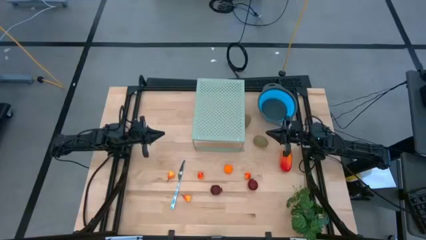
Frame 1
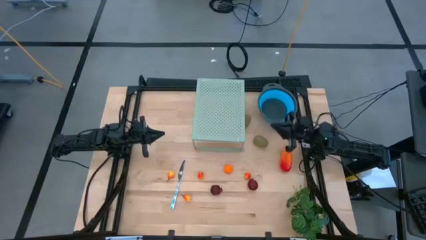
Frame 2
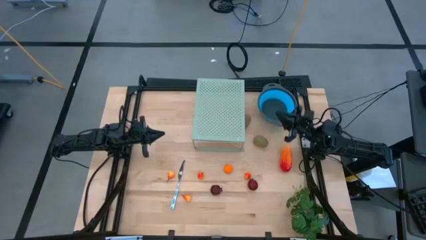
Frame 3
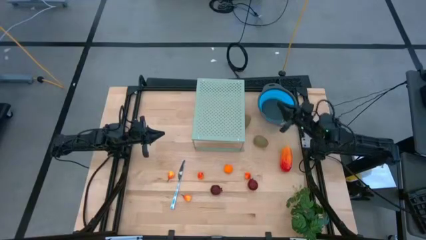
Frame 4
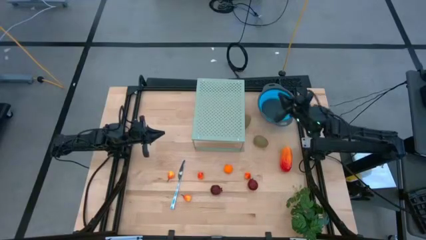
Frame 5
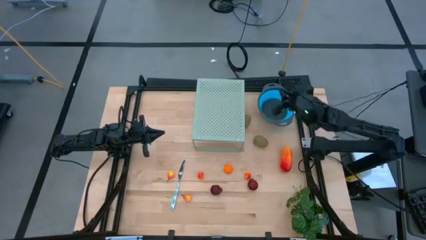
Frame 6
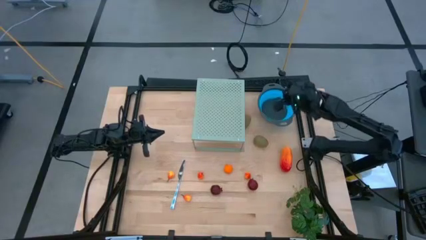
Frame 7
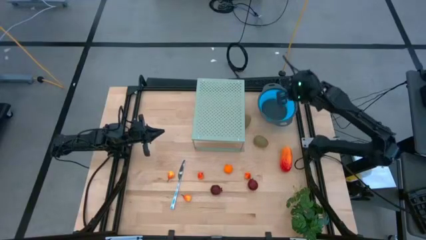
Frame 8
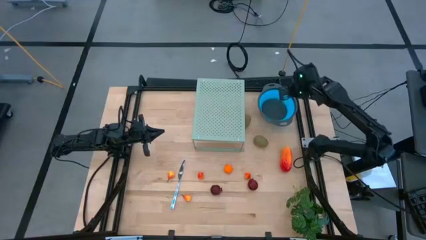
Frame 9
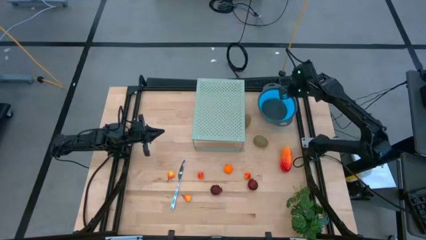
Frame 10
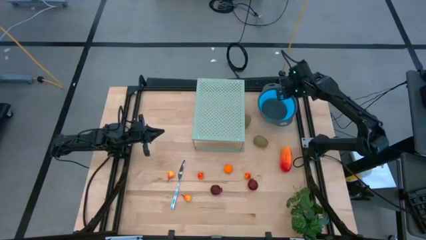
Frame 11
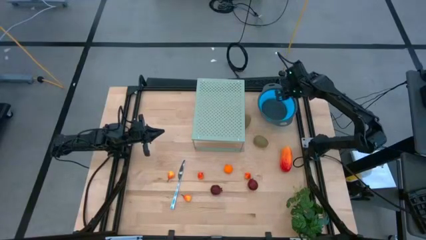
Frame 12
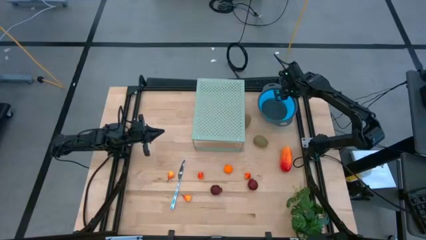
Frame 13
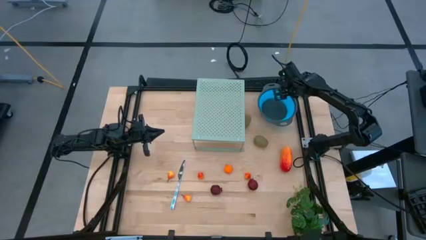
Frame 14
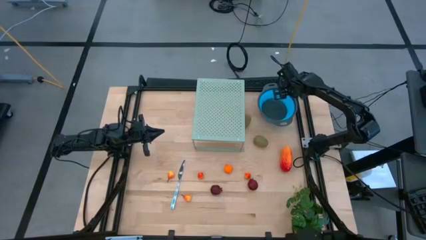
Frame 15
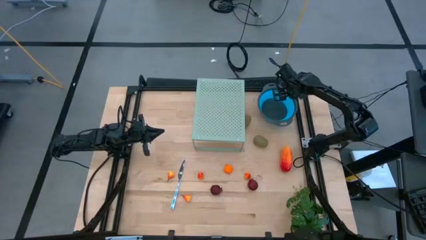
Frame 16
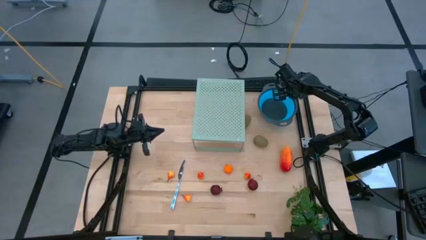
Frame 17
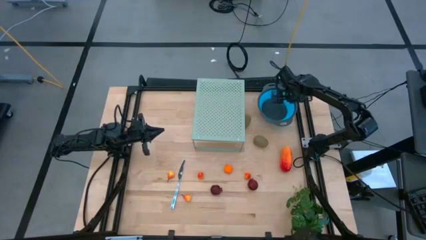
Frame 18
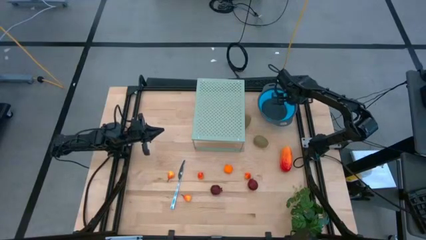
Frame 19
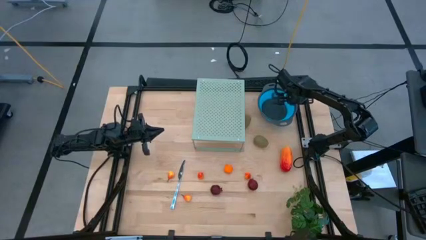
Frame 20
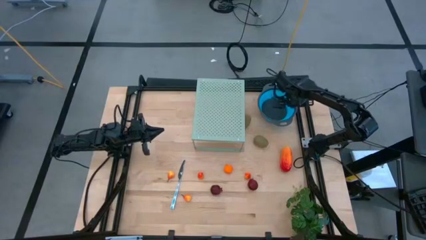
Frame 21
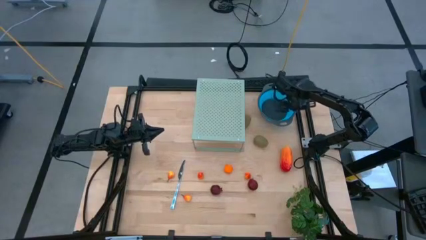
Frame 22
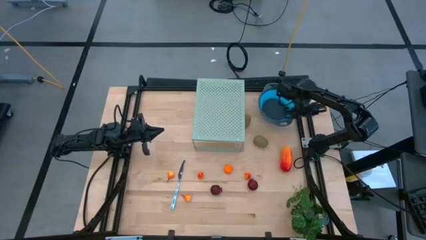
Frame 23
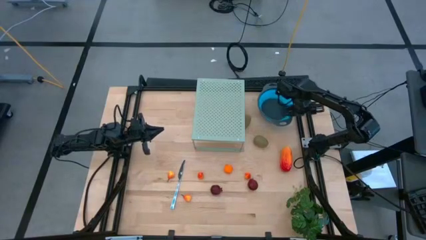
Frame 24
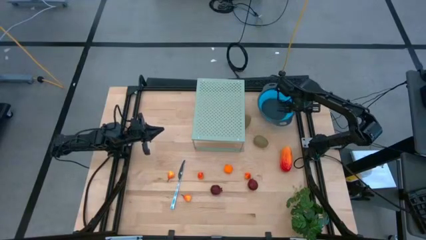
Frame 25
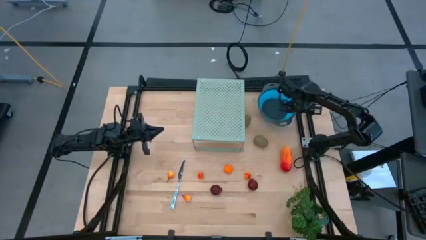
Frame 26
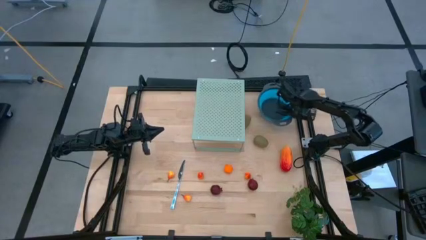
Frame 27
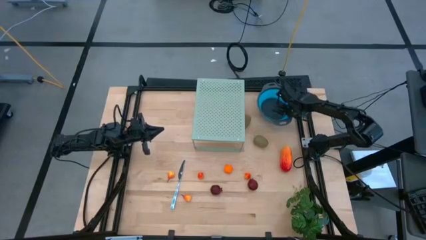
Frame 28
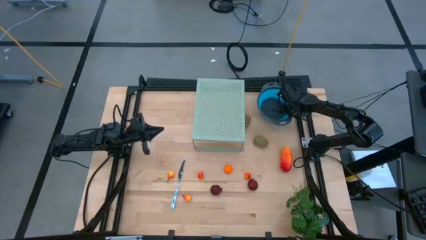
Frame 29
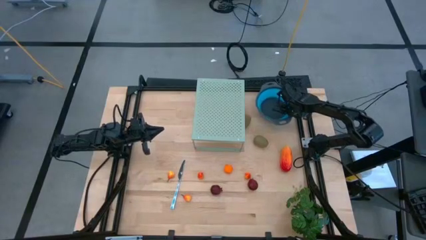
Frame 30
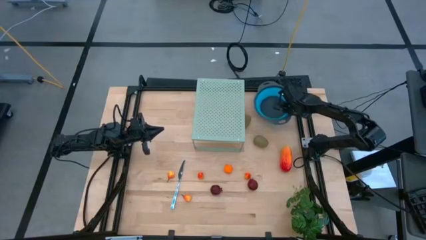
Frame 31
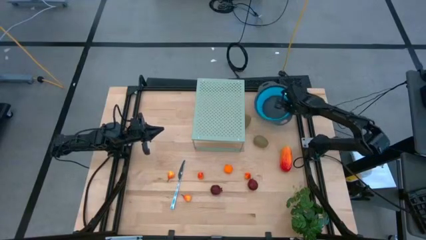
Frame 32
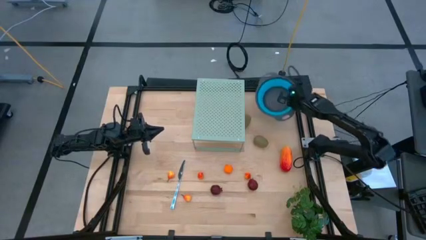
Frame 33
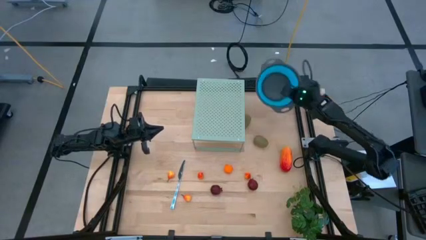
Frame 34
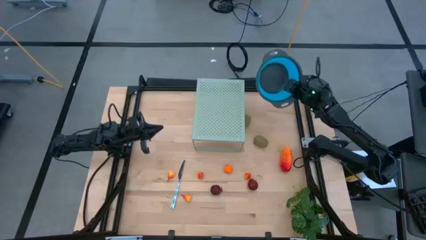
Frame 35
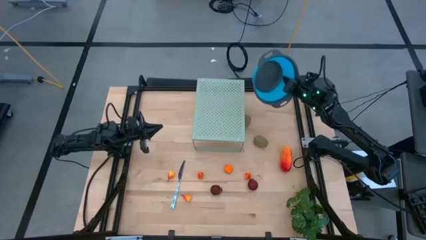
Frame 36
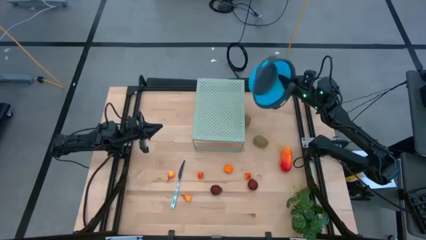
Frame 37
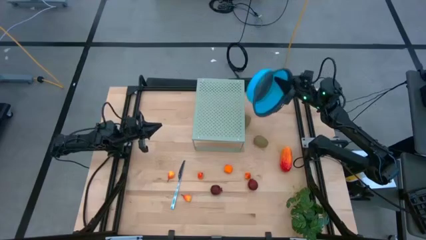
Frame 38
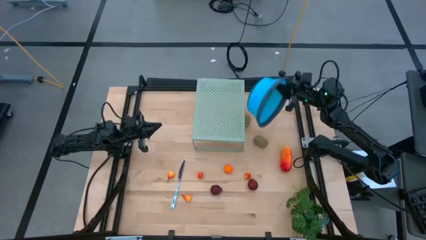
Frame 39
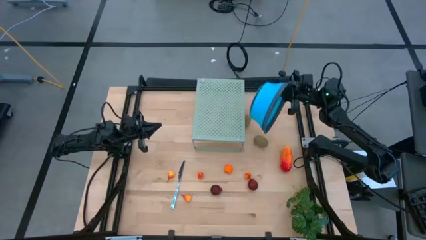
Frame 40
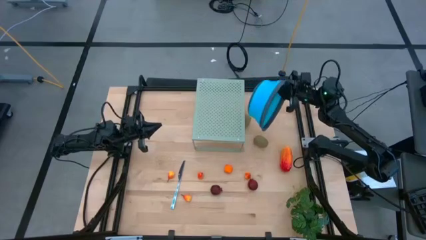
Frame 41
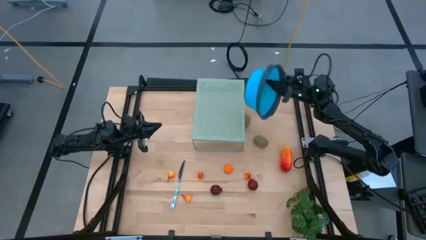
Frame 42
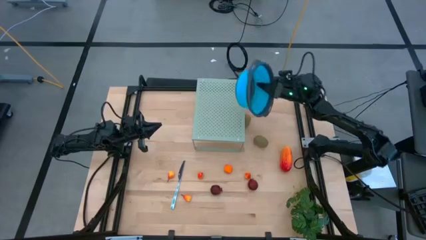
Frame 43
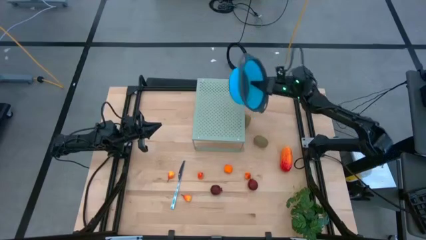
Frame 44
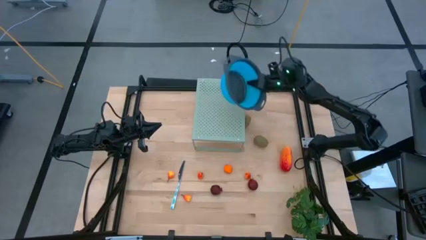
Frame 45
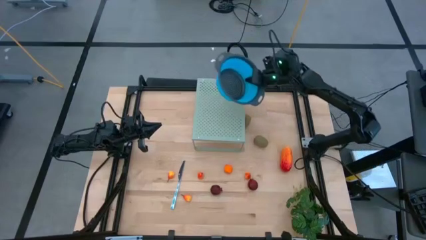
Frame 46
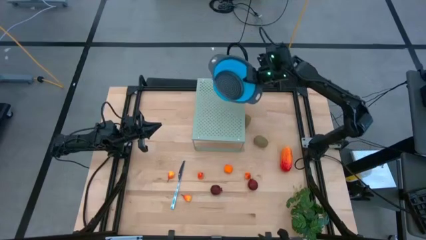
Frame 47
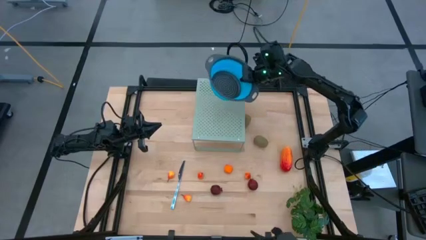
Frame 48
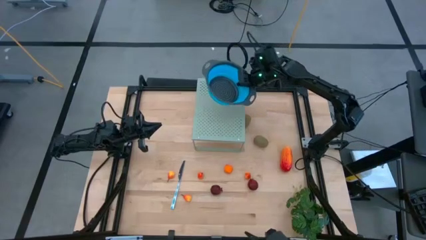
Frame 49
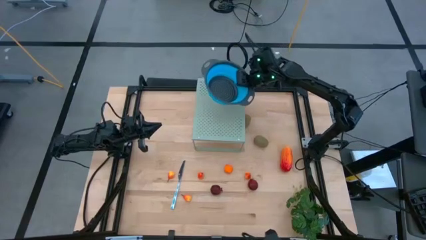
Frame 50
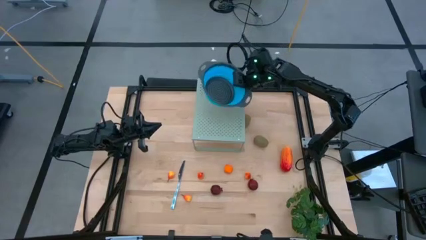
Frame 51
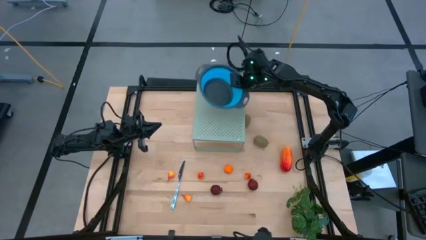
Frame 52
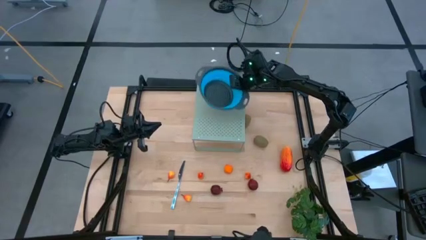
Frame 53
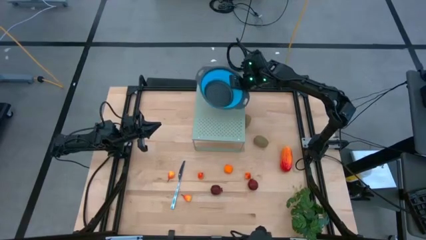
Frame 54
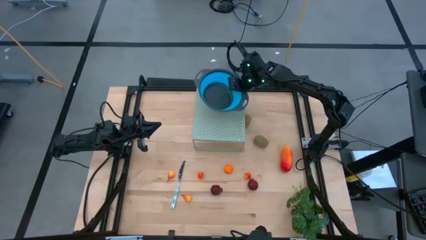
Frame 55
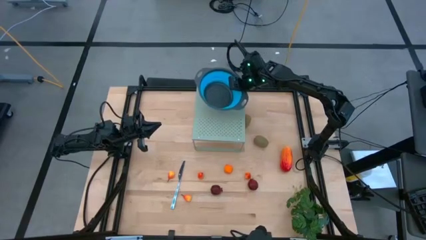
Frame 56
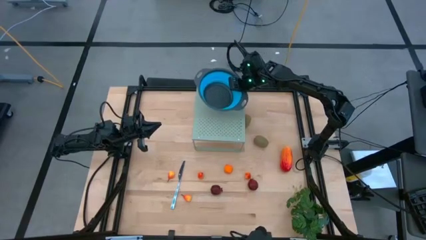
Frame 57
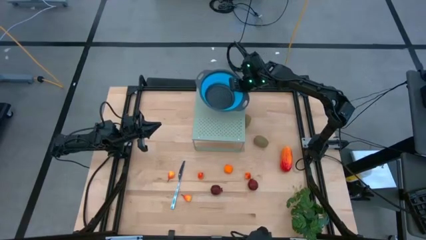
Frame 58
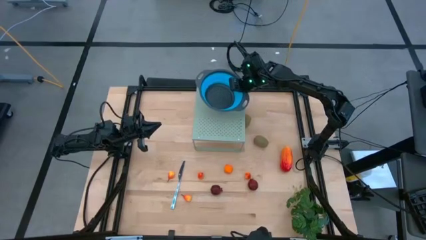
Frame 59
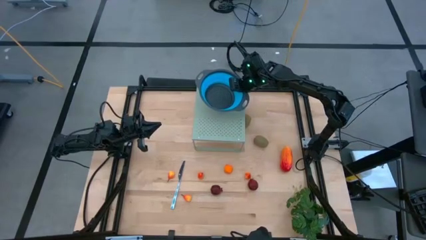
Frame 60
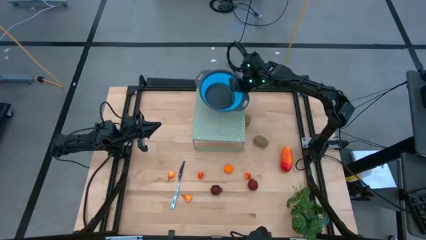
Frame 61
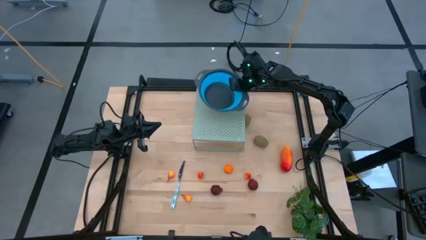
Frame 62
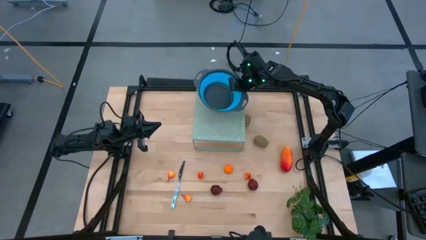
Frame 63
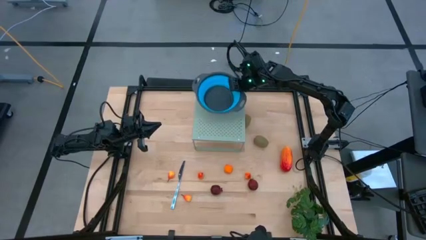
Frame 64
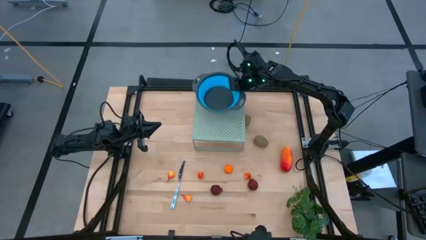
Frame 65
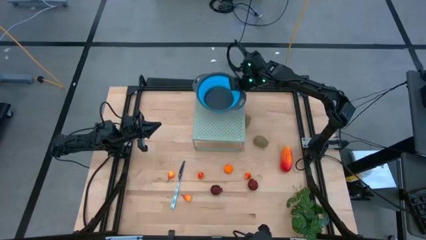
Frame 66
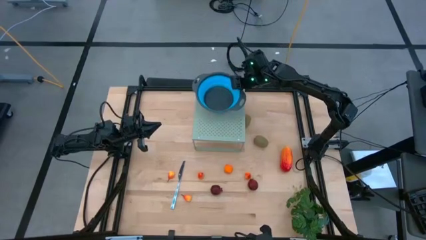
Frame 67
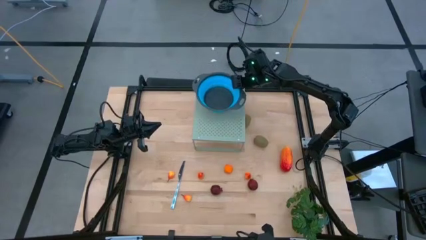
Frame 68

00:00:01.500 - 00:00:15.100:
Task: Pick & Place Fruit
Put the blue strainer bowl on the shelf
